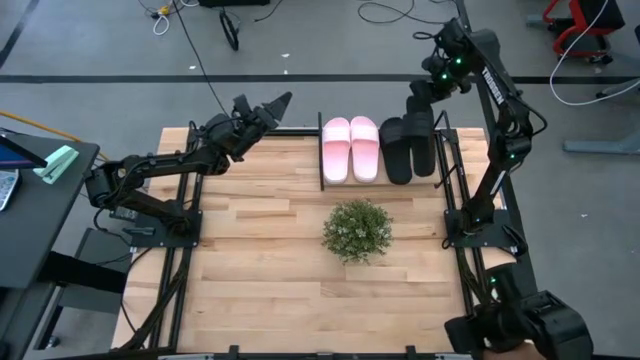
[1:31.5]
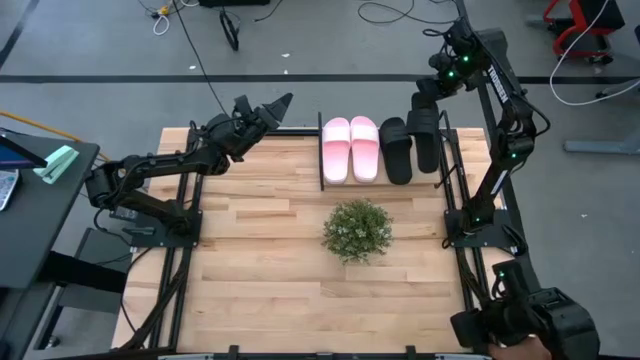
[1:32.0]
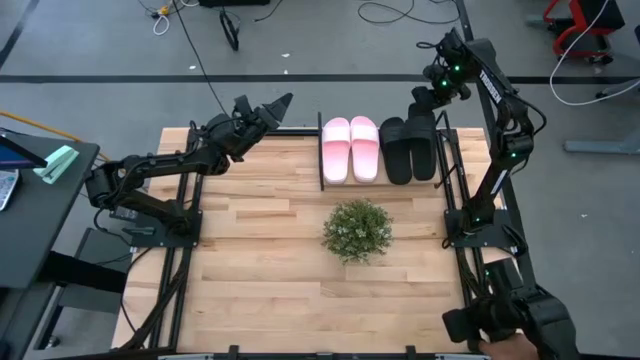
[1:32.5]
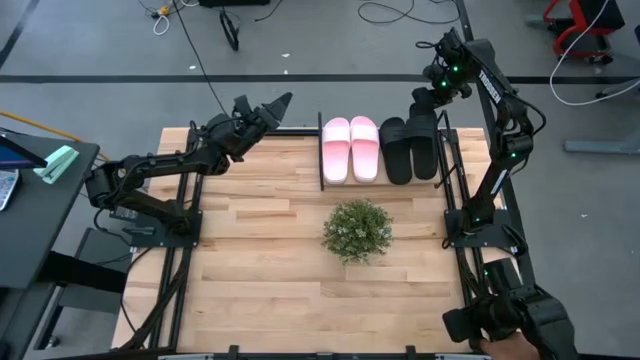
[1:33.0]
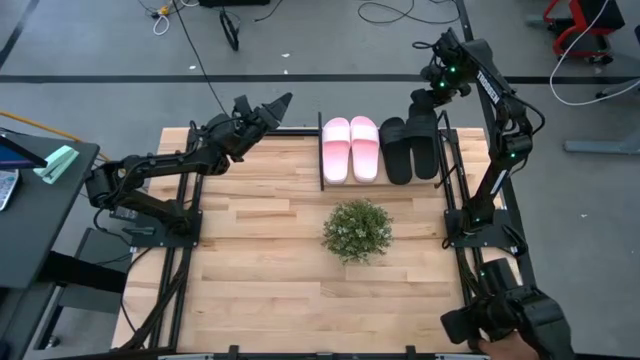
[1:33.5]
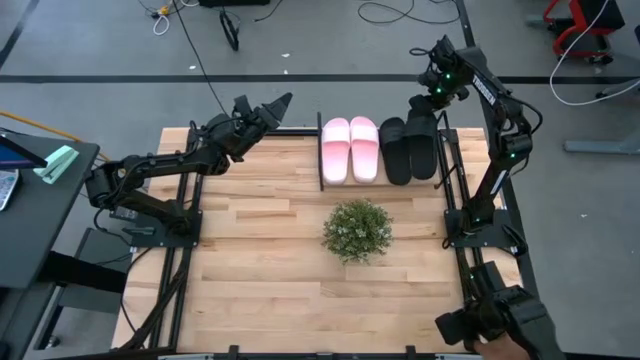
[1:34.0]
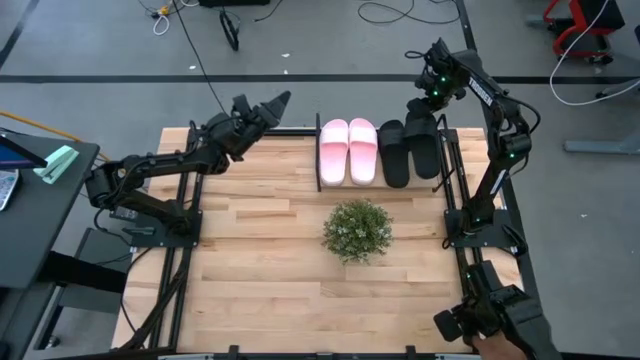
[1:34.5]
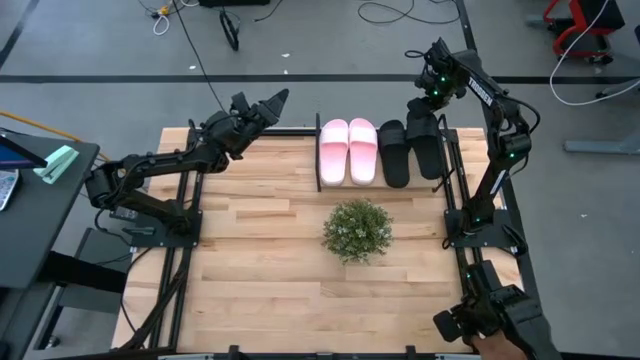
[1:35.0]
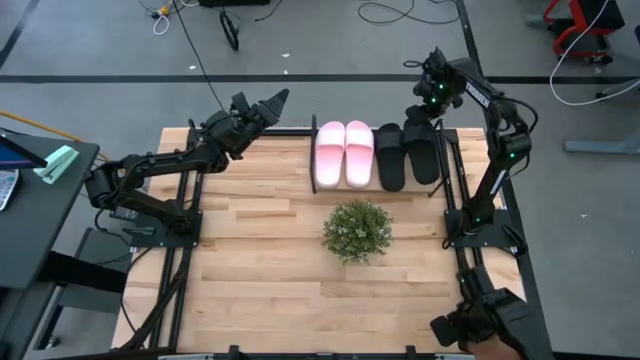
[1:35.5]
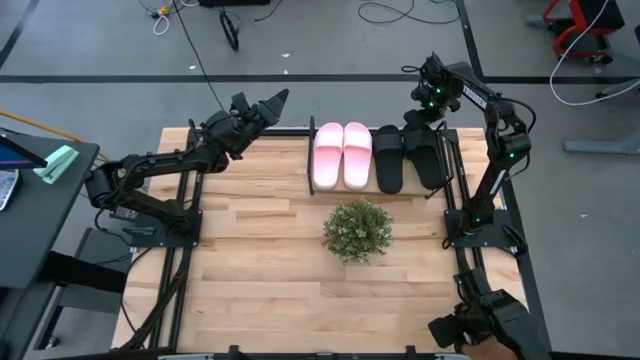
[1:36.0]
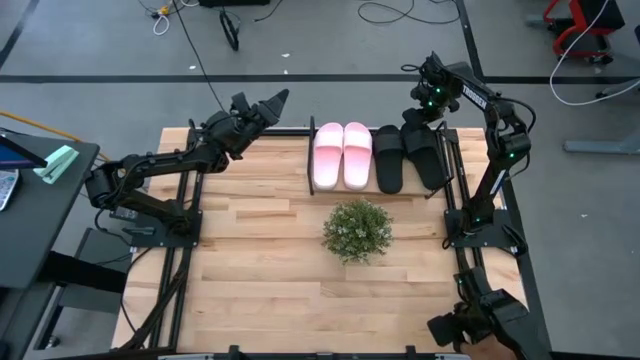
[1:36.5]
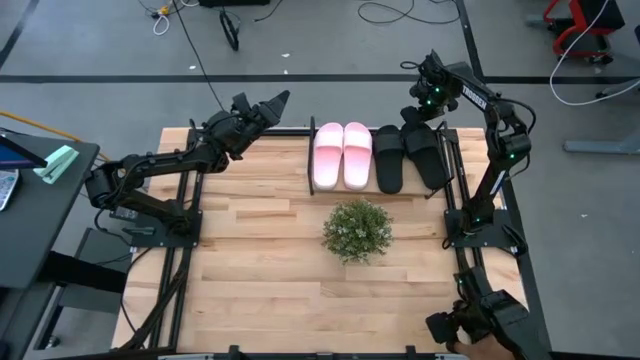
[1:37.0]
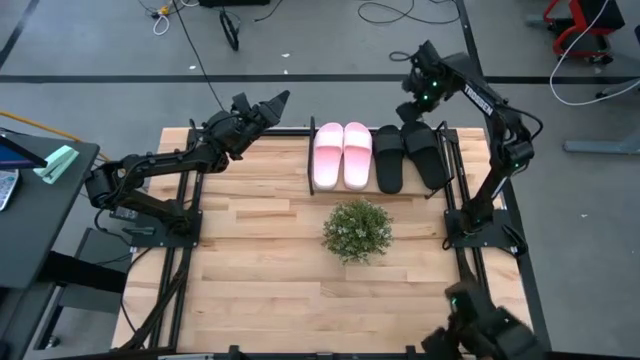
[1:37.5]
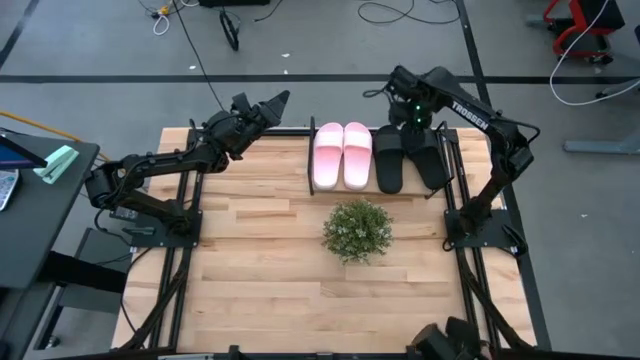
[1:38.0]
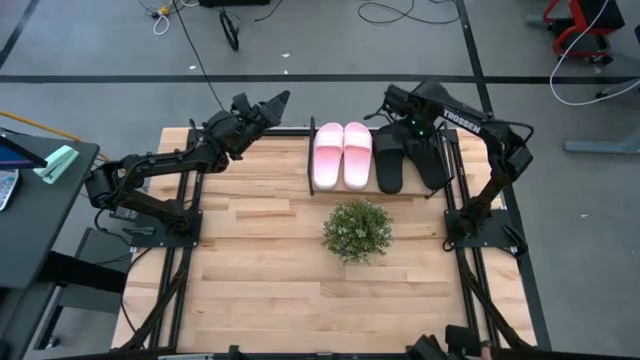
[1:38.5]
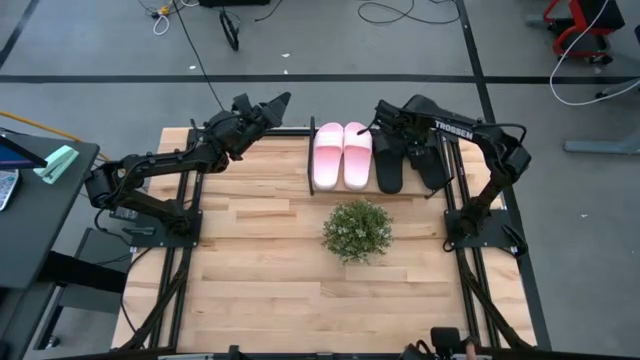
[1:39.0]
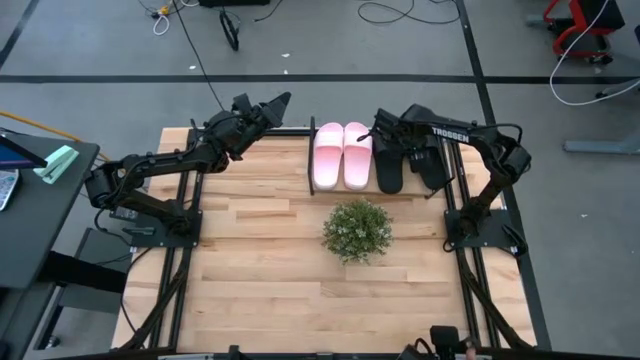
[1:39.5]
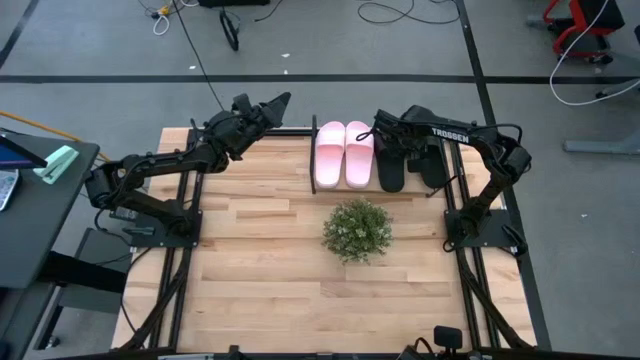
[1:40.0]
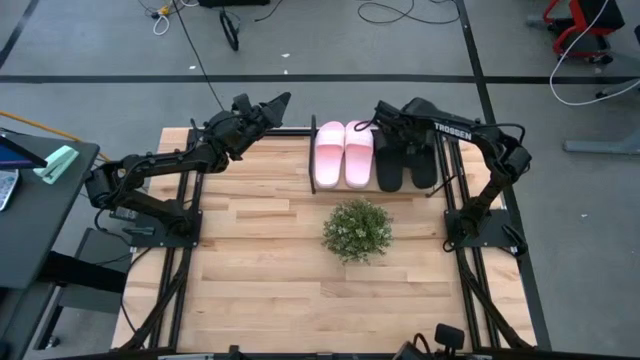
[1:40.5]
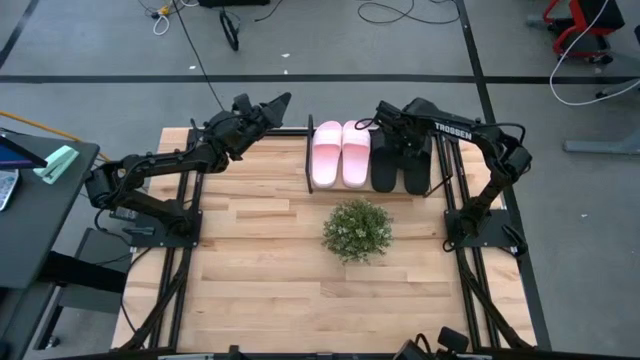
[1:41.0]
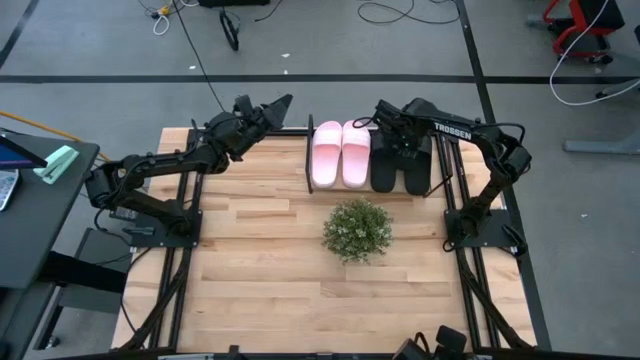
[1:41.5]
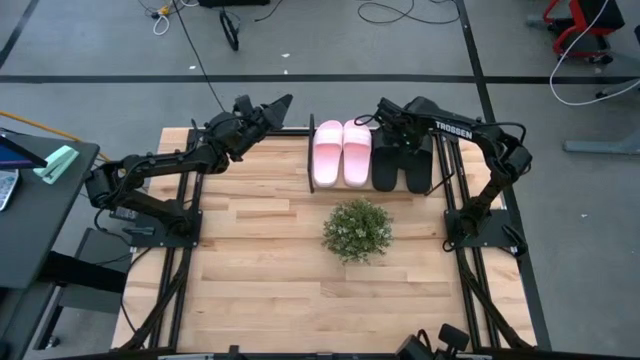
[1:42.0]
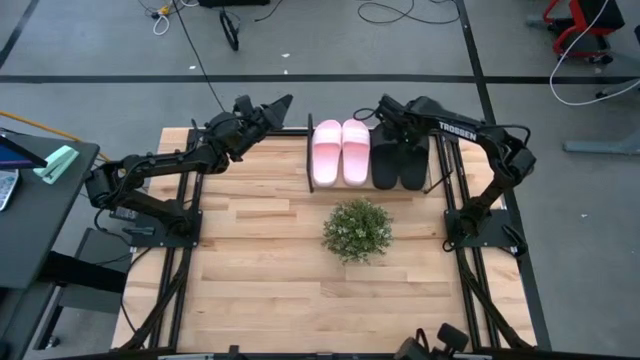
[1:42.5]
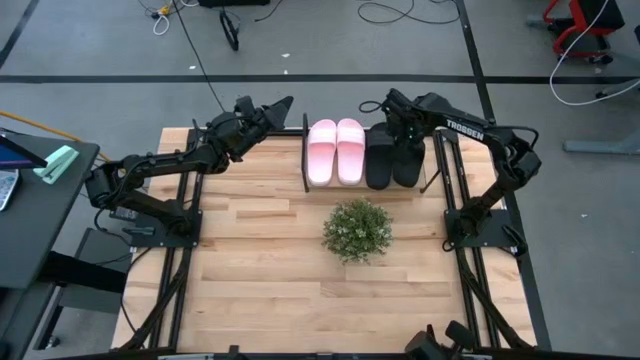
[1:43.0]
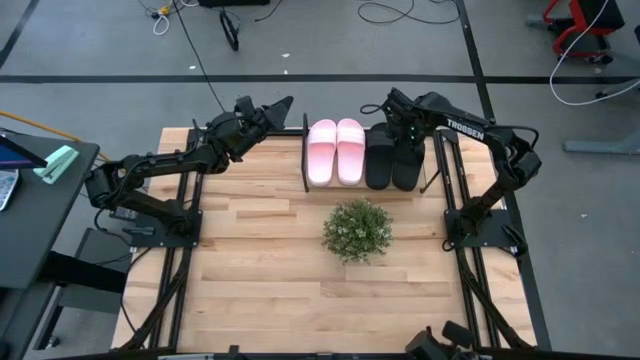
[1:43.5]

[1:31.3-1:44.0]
Task: Pick and place slides into the shelf
Put the black slide on the shelf

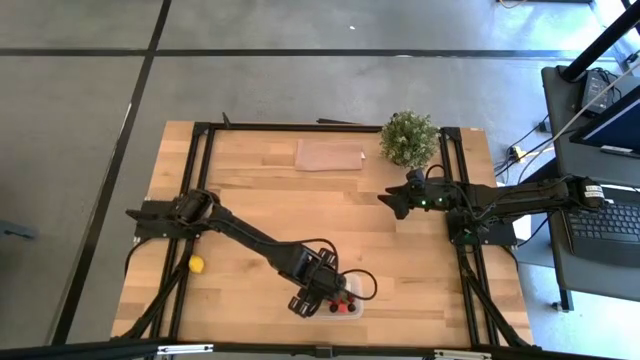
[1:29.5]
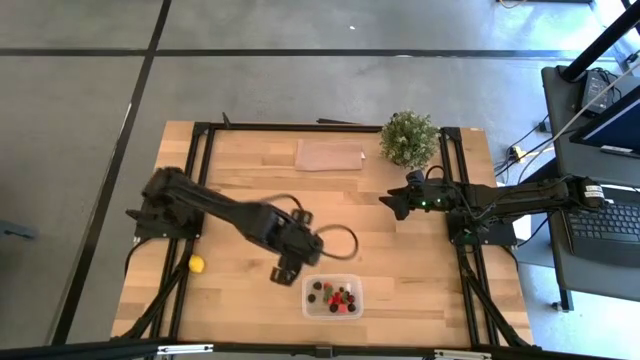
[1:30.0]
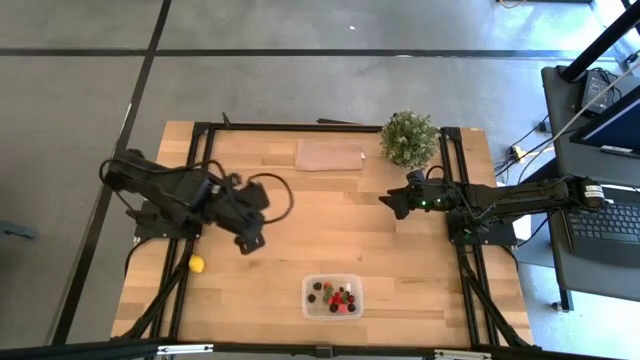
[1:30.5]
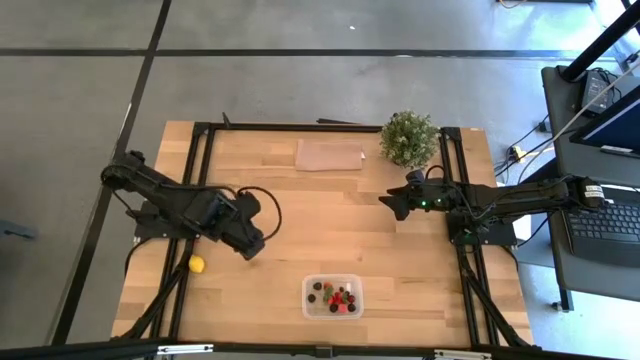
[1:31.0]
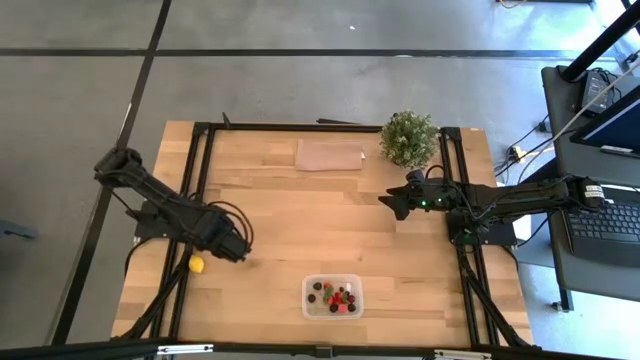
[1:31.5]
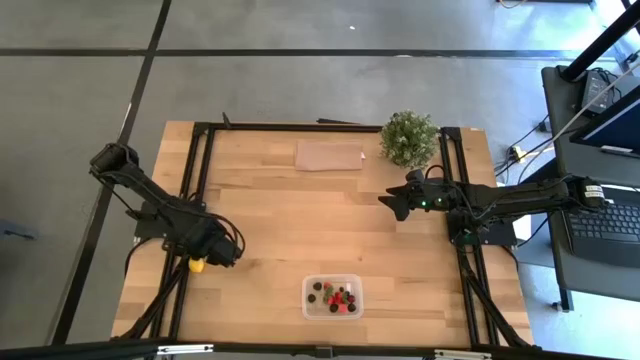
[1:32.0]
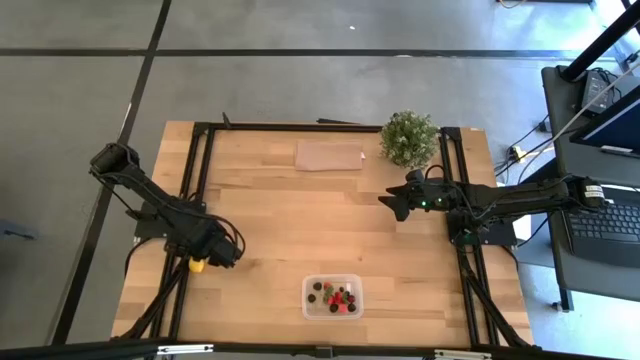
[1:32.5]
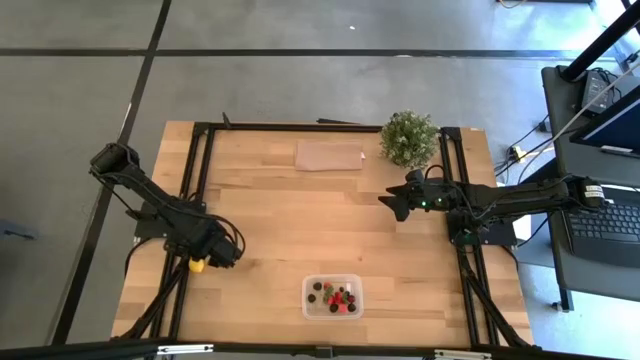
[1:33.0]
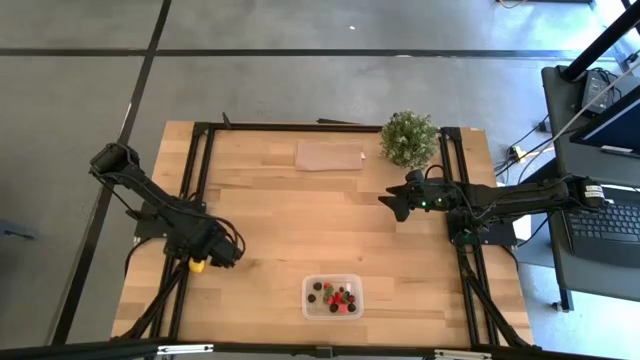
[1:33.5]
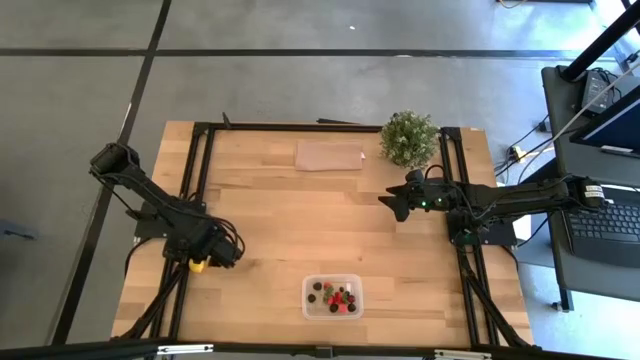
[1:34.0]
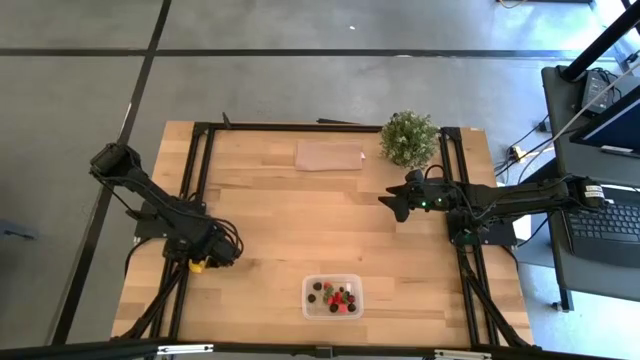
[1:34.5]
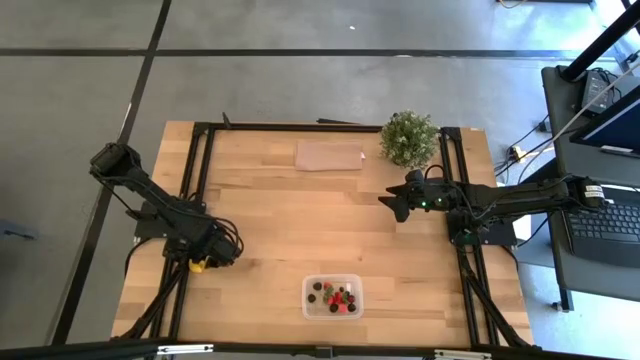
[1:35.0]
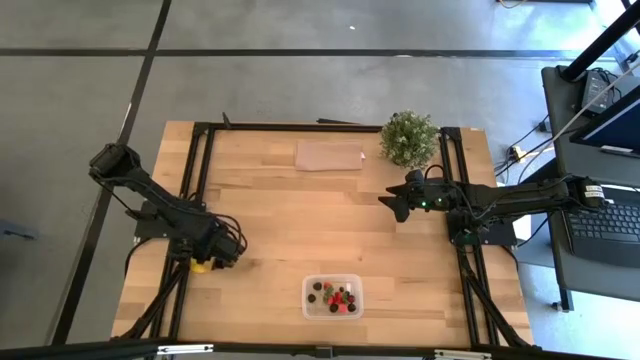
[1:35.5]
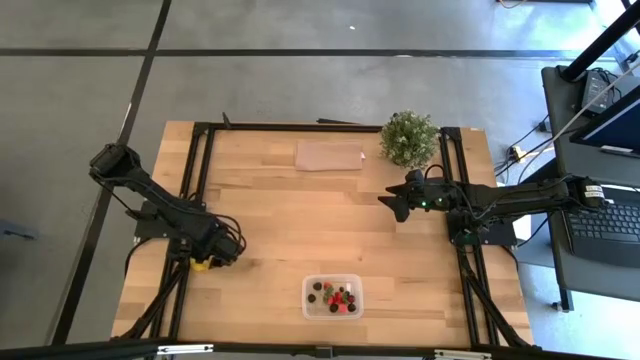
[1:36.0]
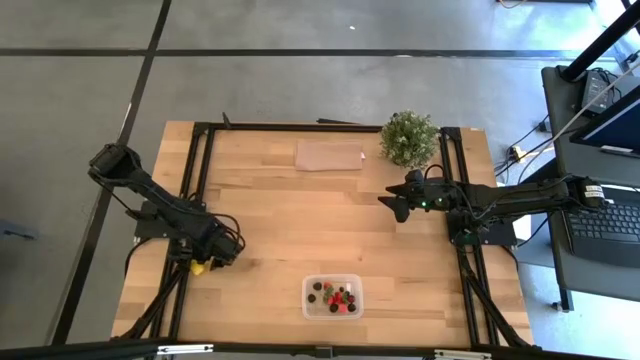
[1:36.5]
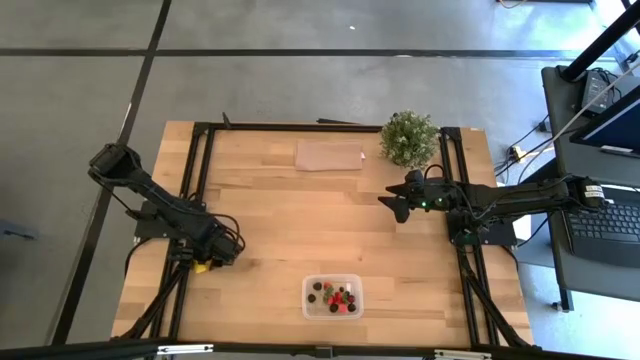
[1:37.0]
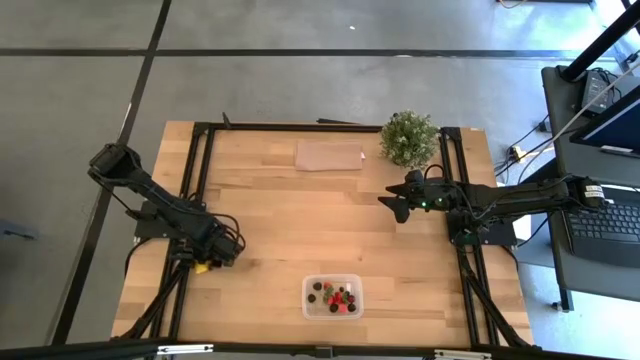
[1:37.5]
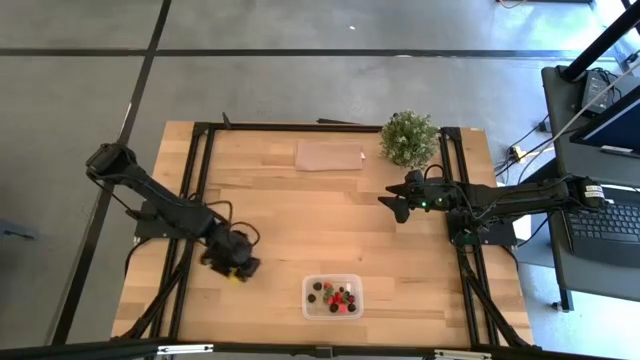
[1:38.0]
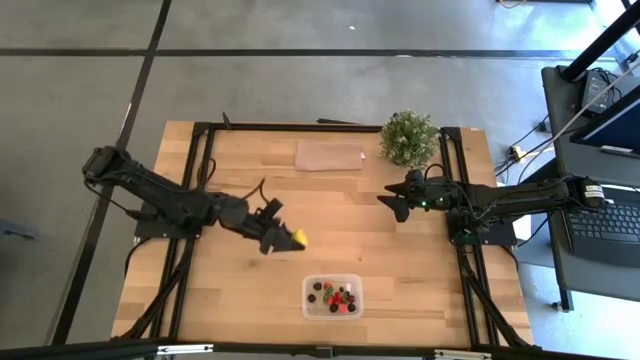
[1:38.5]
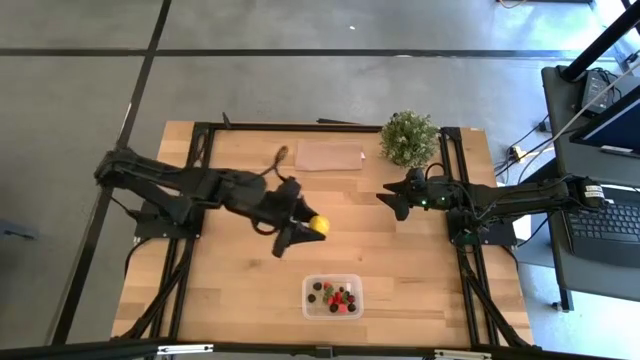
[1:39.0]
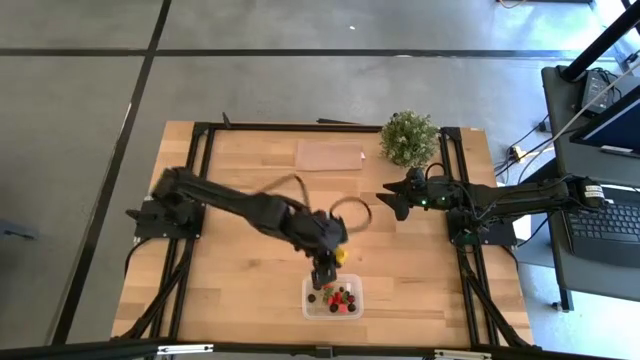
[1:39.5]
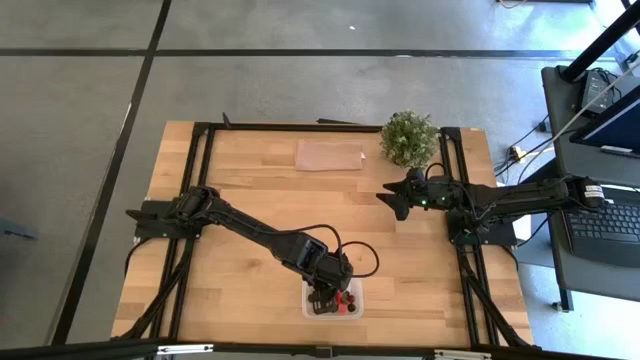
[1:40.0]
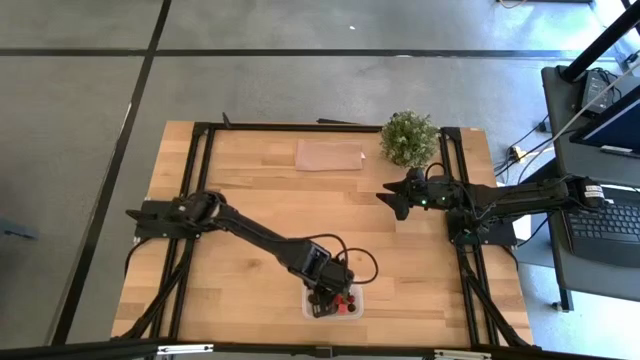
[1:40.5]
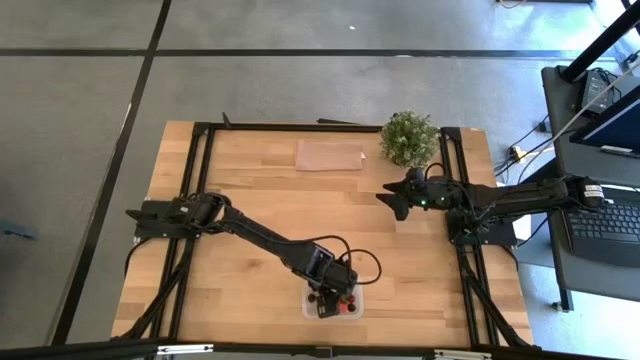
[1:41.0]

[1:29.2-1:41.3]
Task: Pick and placing Produce into tupperware
Put the lemon into the transparent container
